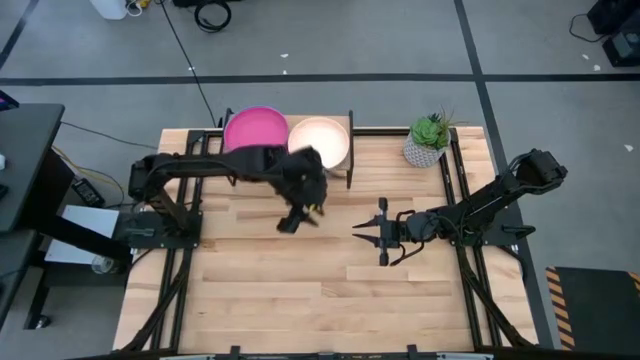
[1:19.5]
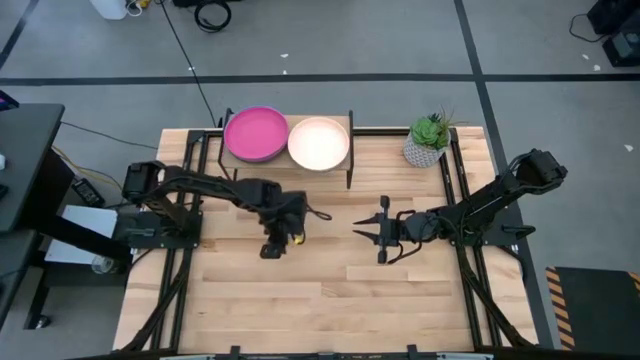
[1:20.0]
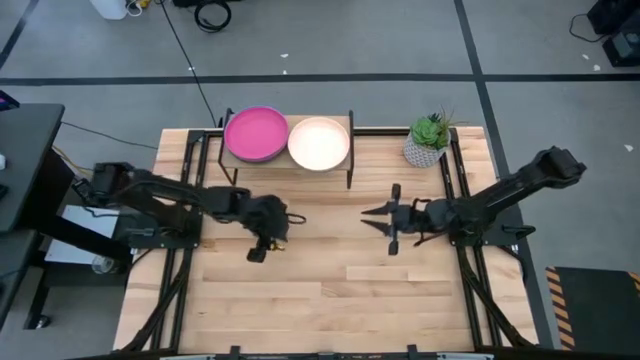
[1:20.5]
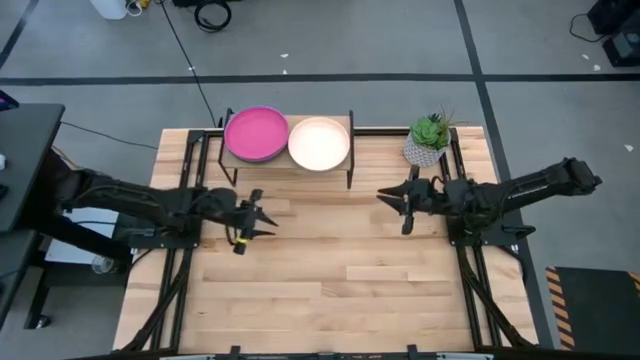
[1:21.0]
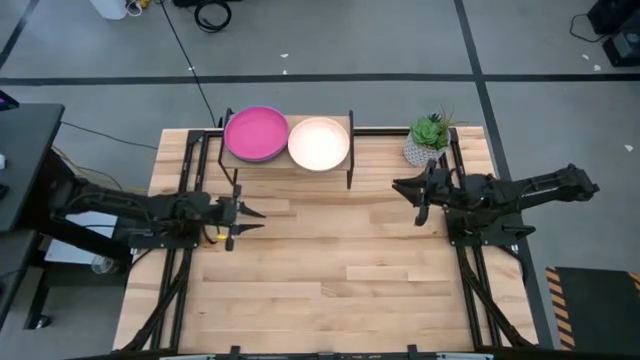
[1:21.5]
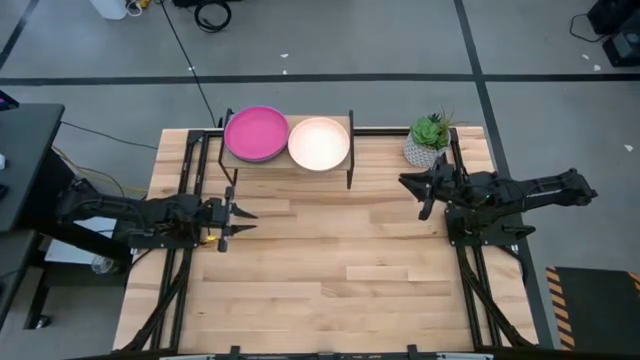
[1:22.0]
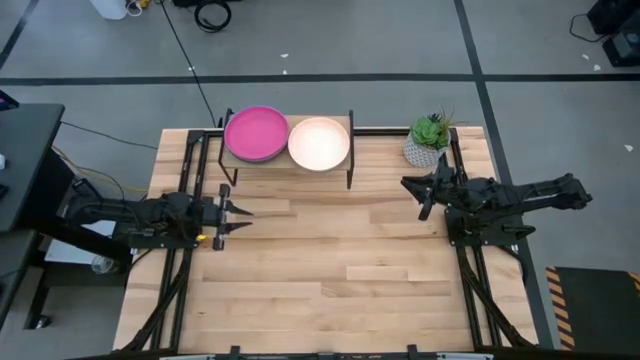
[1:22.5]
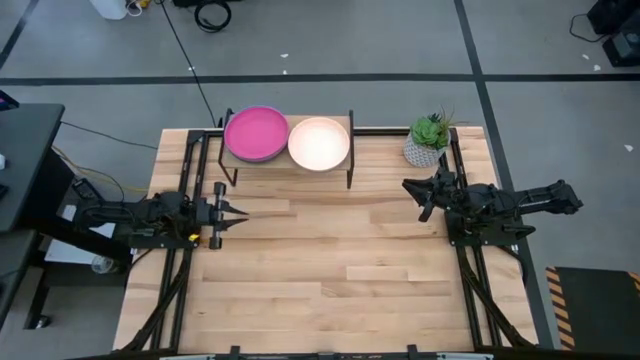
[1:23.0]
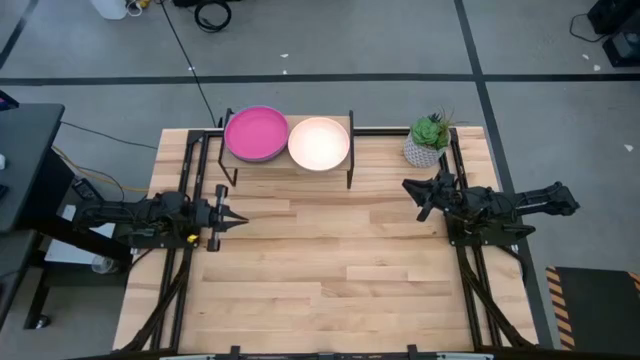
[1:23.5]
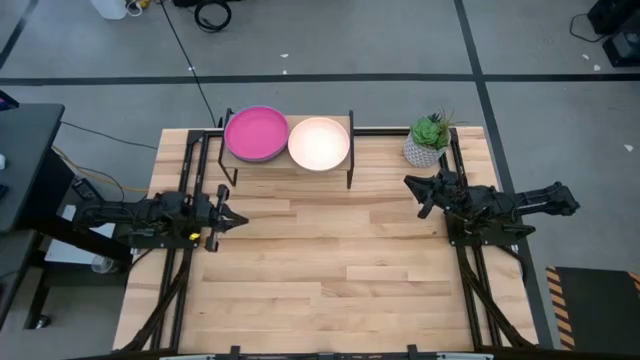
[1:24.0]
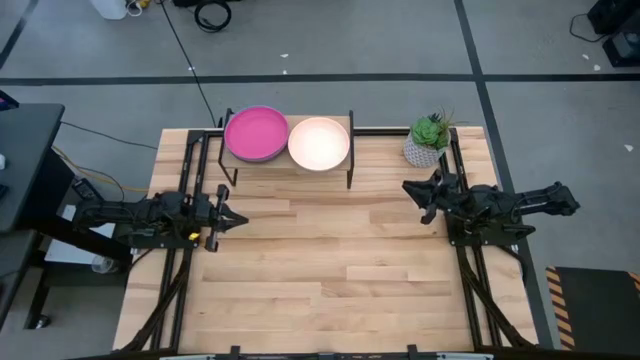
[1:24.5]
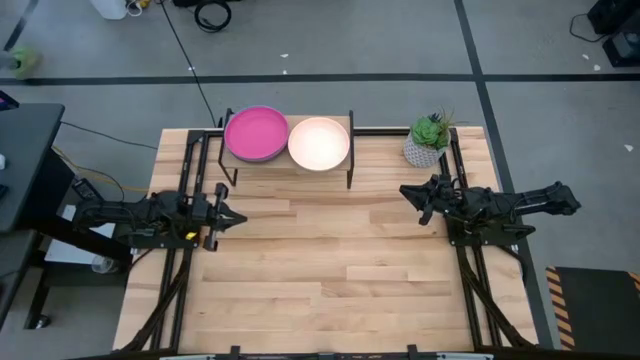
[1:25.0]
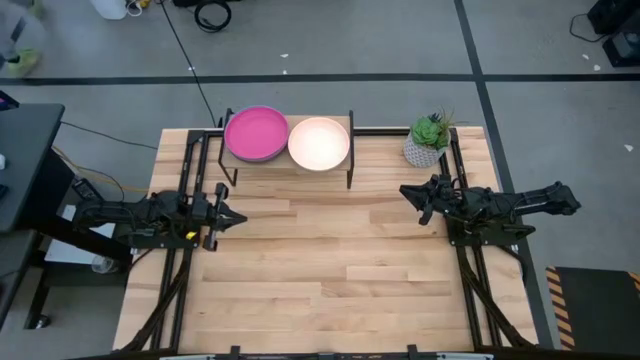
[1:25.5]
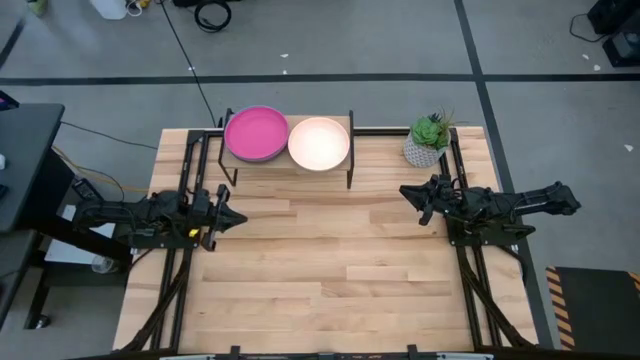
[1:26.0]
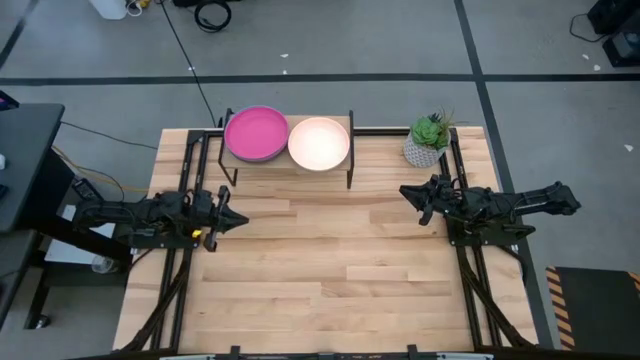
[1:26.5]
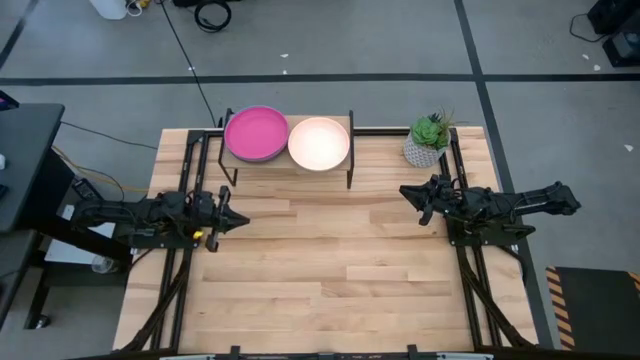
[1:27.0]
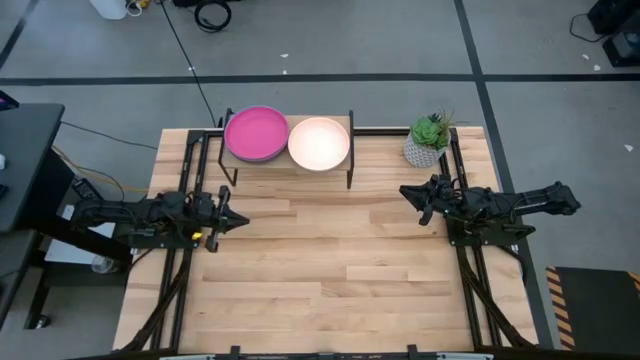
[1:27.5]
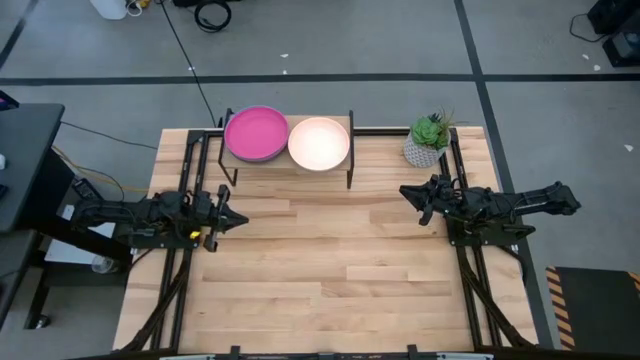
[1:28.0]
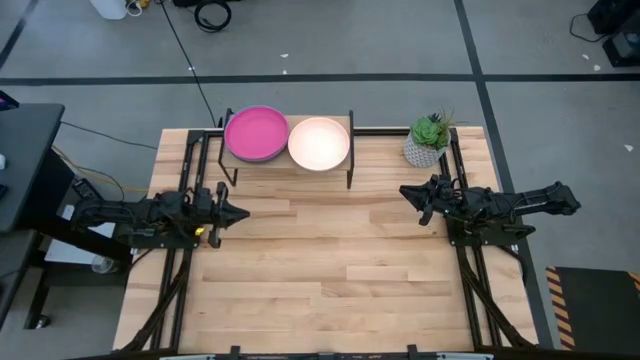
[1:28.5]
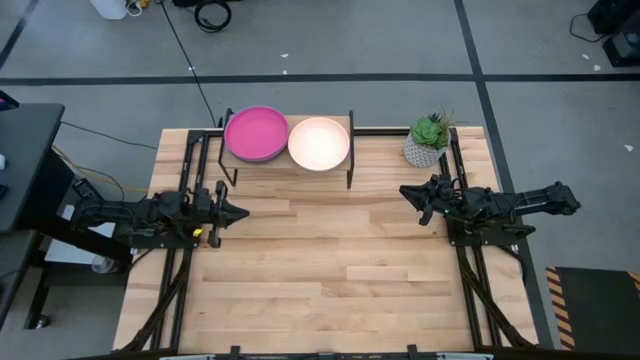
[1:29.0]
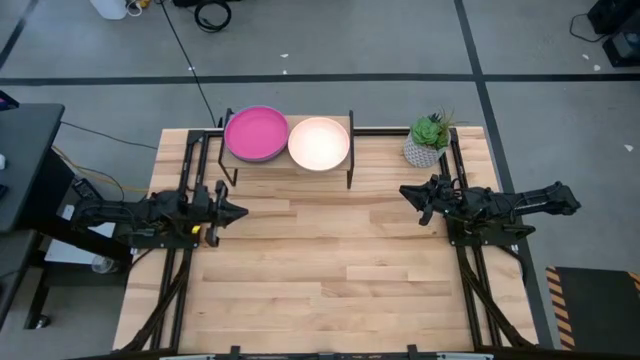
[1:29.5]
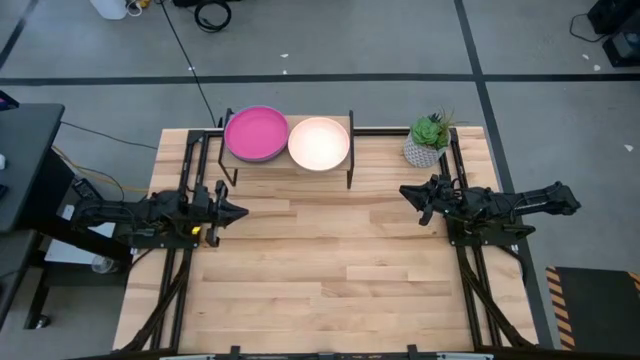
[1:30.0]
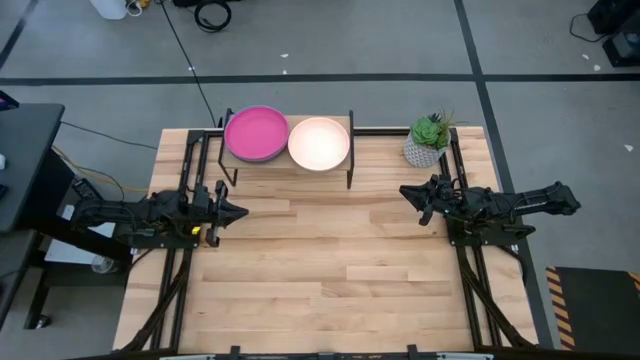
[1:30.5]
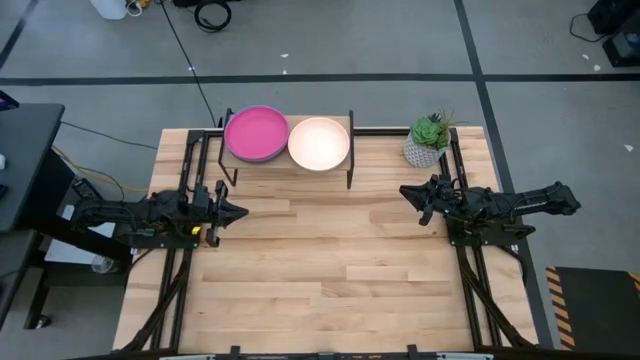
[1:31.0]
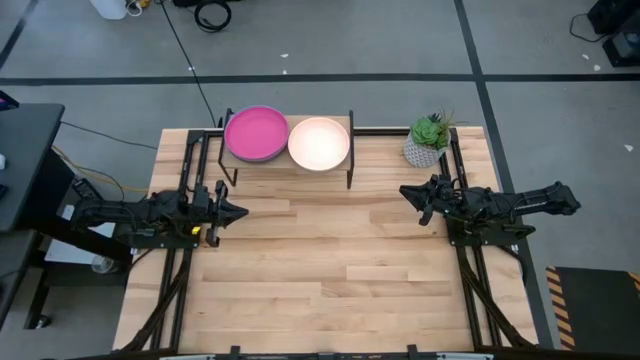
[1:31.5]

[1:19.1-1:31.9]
Task: Place and stack plates onto a shelf
Return to Home Position

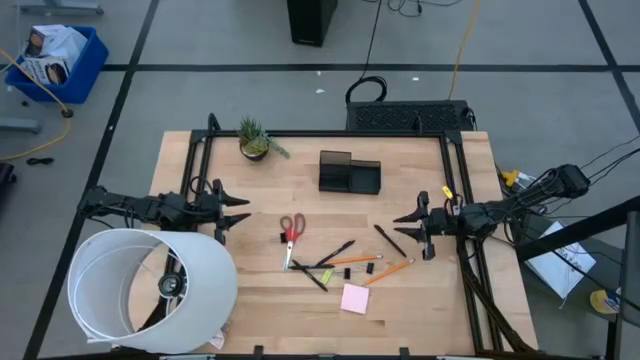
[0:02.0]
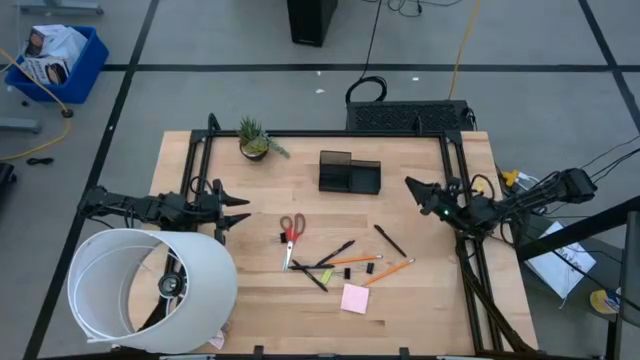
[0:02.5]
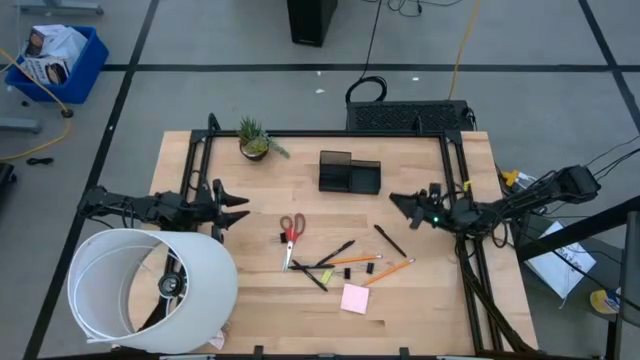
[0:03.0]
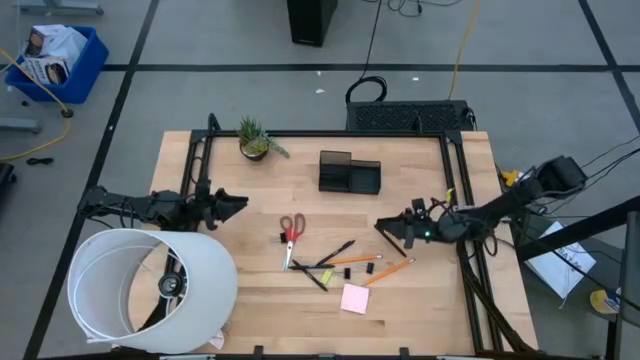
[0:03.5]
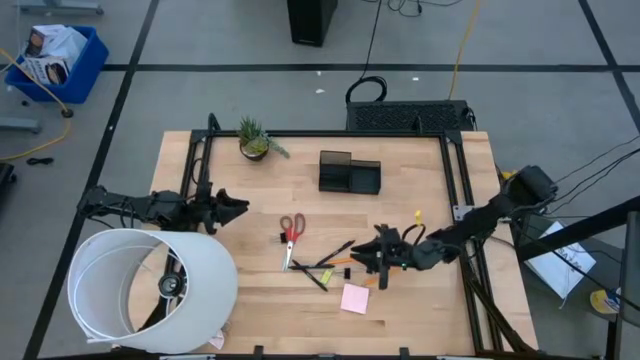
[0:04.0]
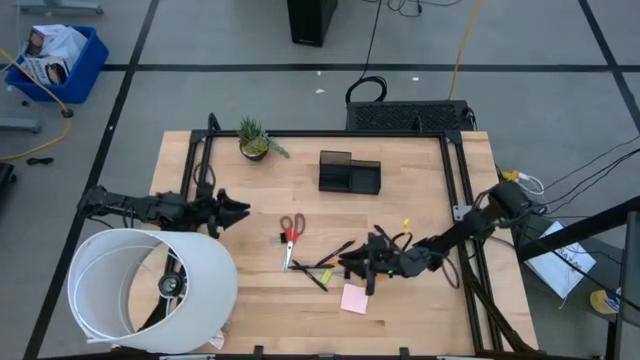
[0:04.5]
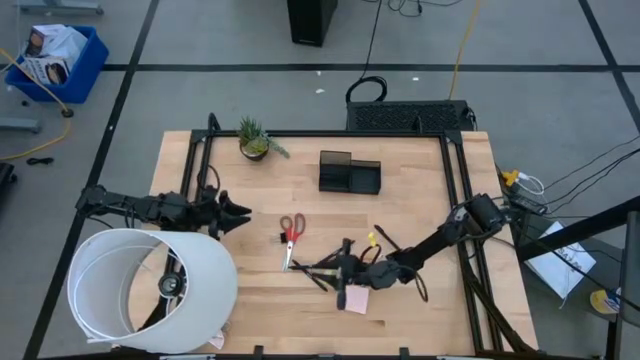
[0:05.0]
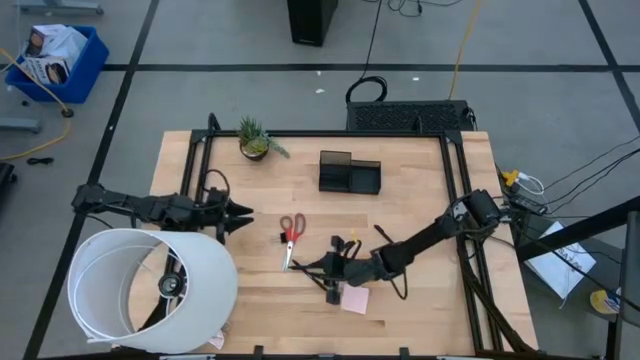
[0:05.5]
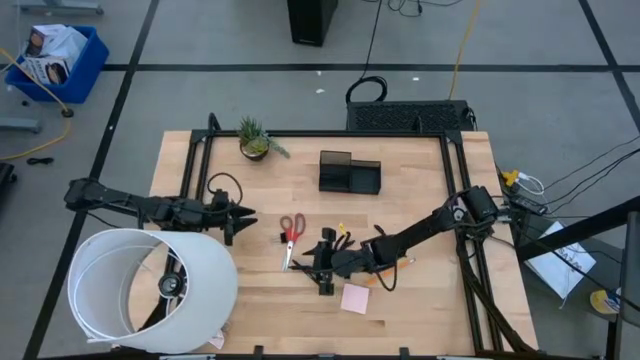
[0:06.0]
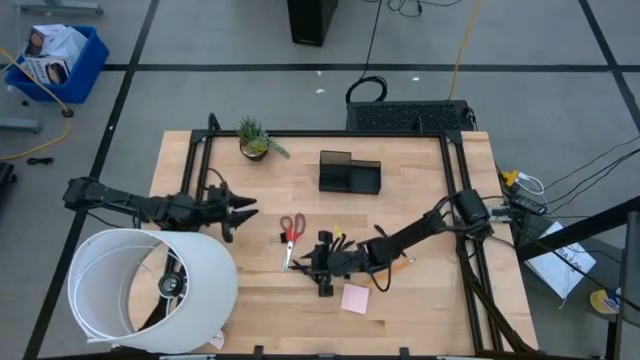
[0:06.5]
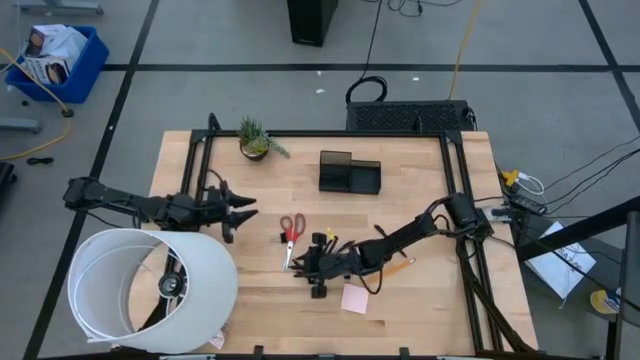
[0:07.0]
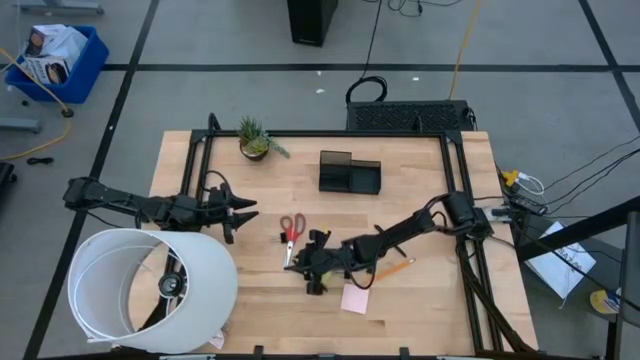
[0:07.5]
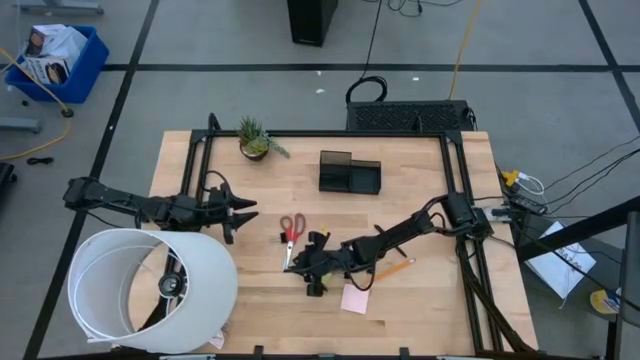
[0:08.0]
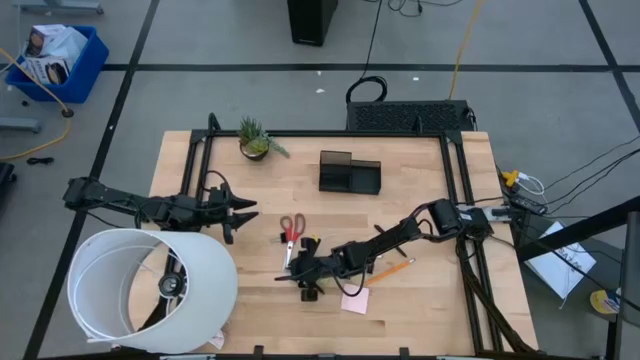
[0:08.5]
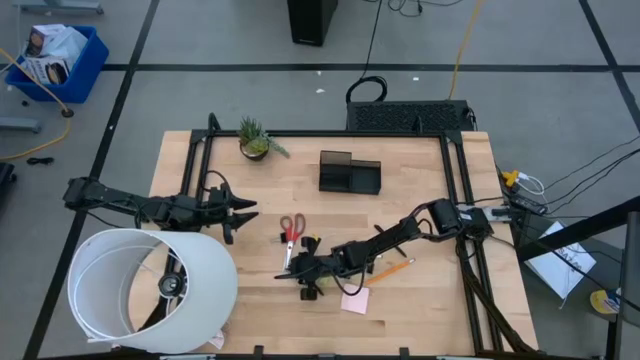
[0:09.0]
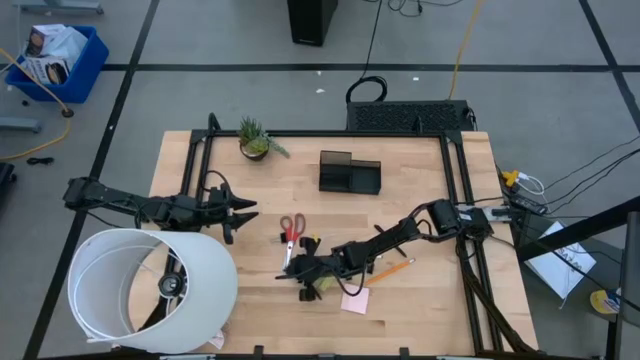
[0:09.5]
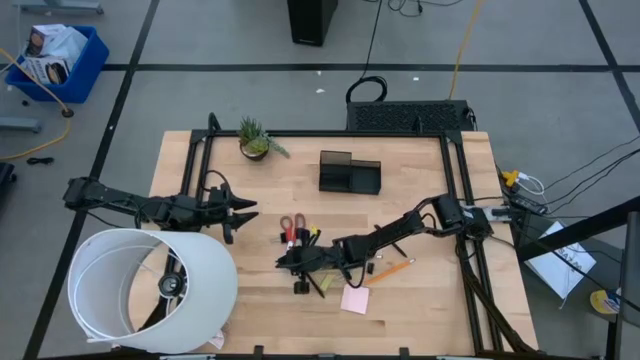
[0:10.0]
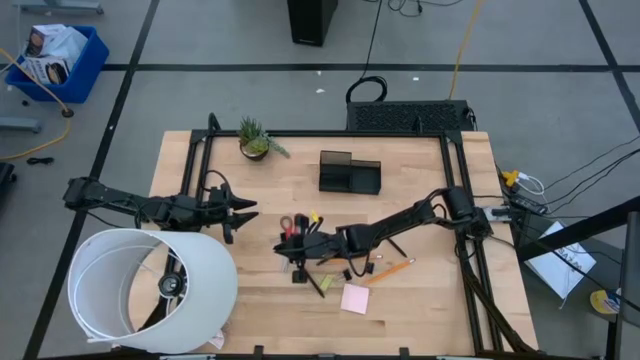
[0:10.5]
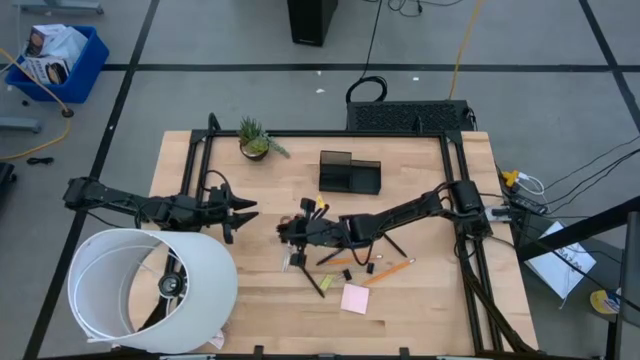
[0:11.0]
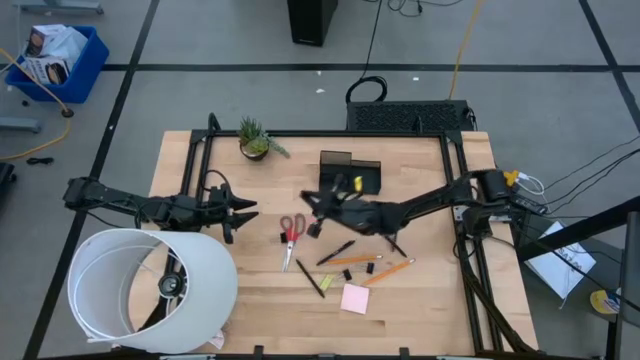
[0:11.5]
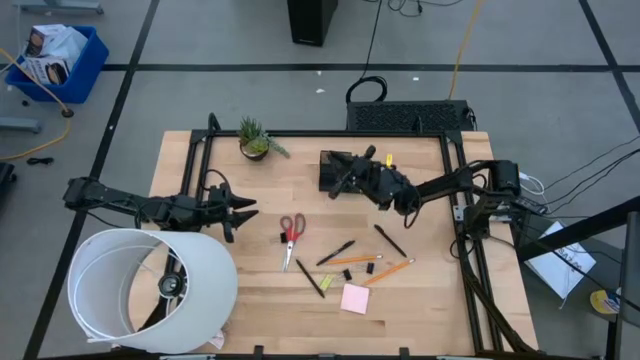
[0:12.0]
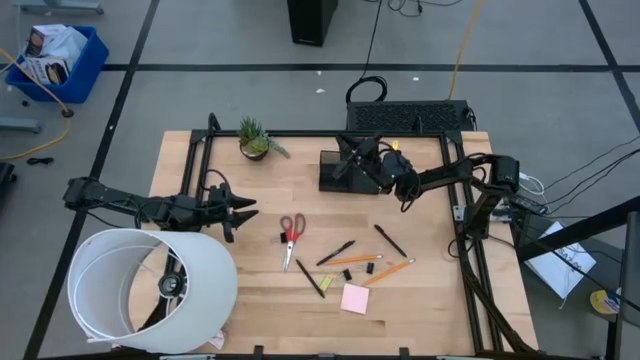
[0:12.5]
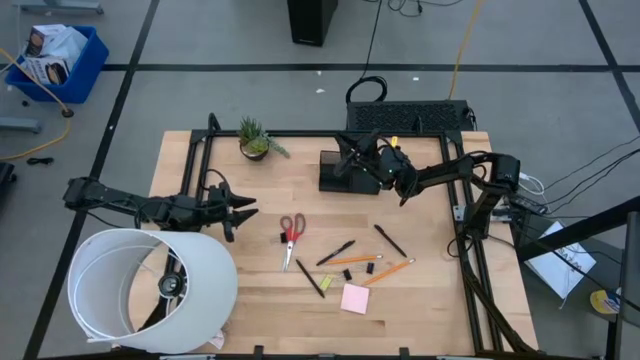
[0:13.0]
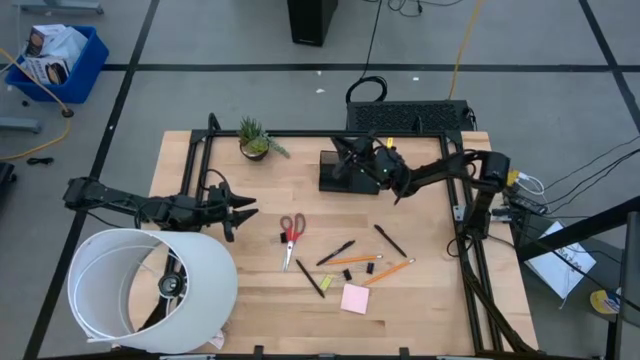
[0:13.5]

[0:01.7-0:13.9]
Task: Pick and place office supplies into organizer
Put the black pen into the desk organizer
